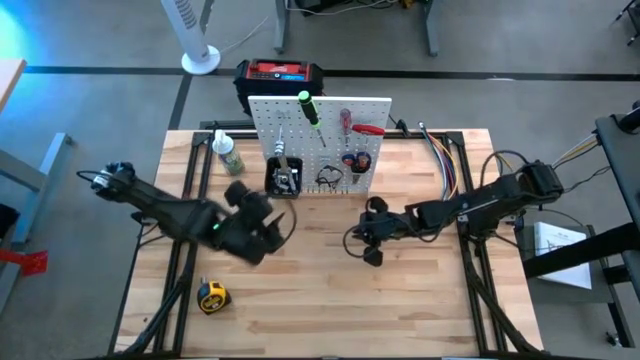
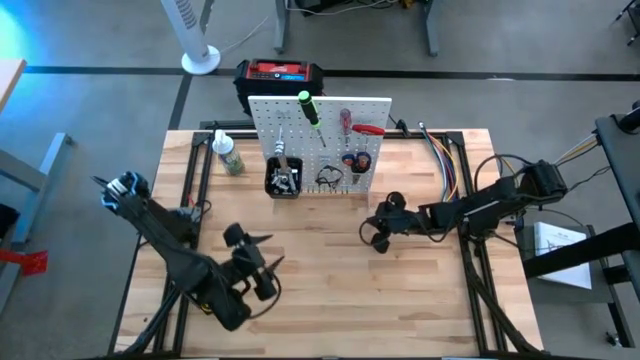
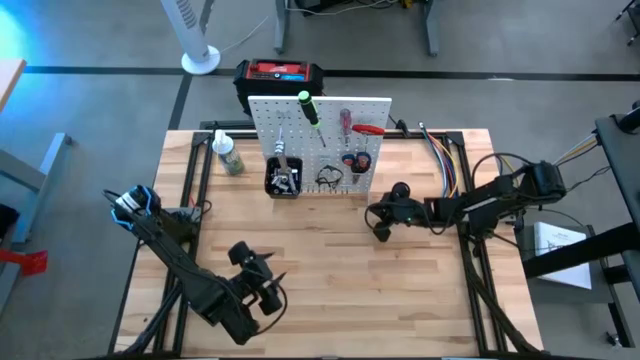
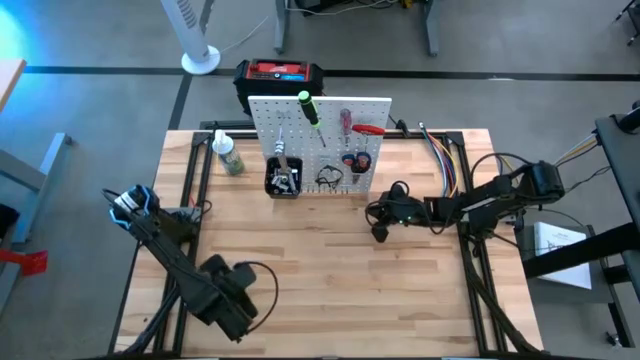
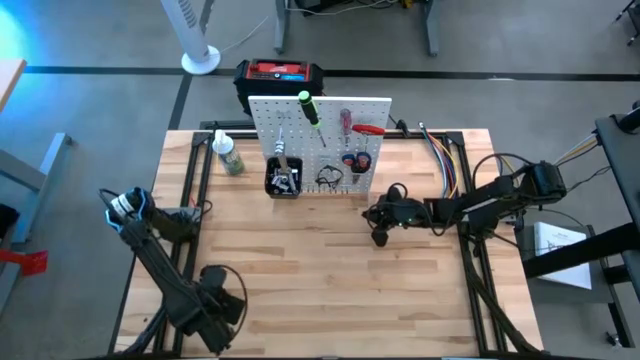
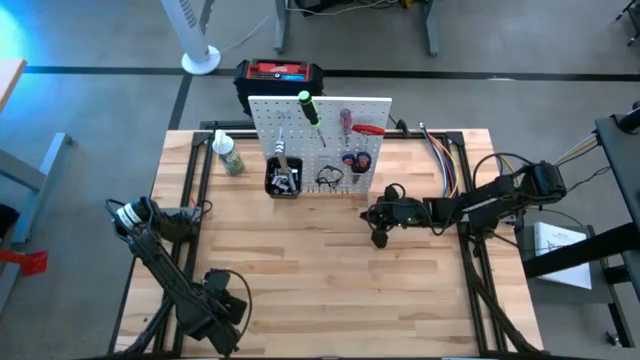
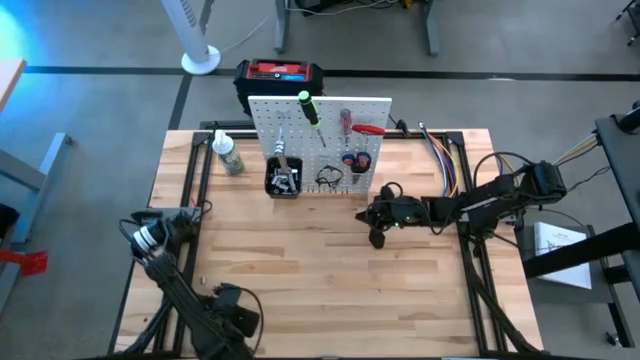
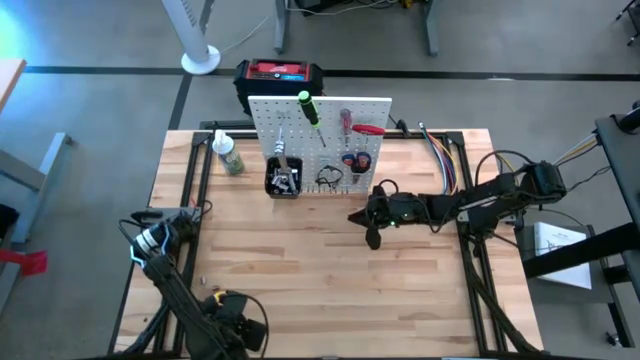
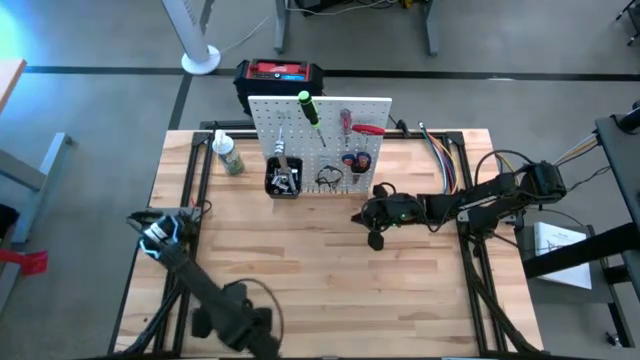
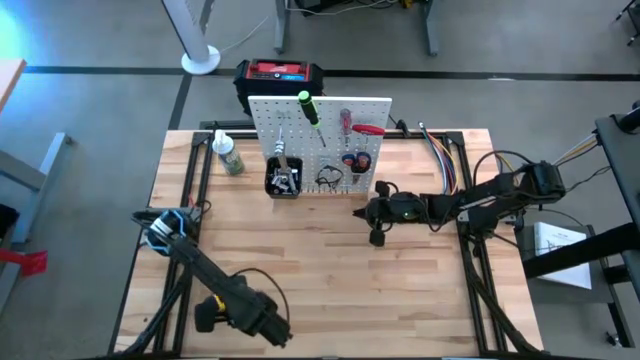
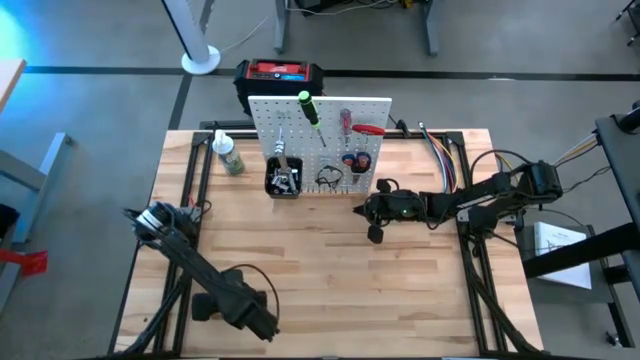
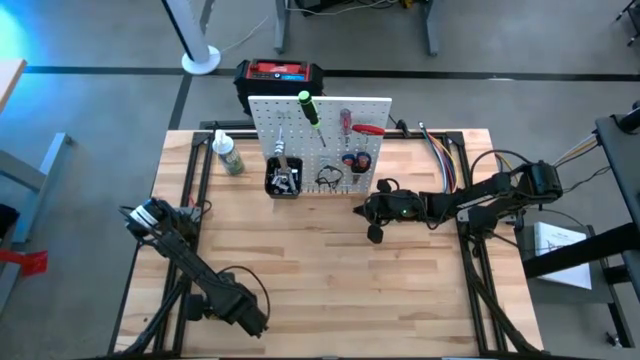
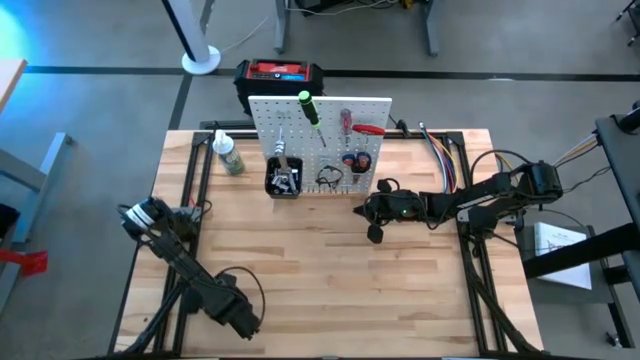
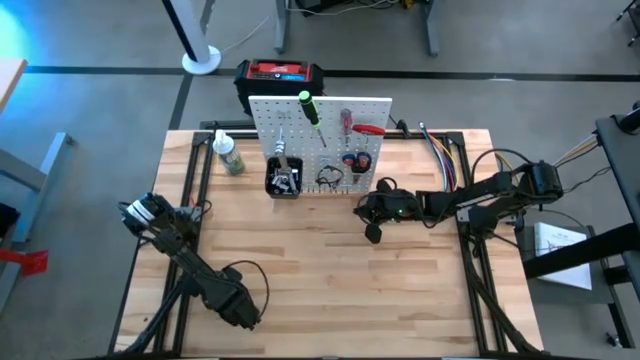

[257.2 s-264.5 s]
Task: Hang tools onto peg board
Hang the yellow measuring tape on the pegboard

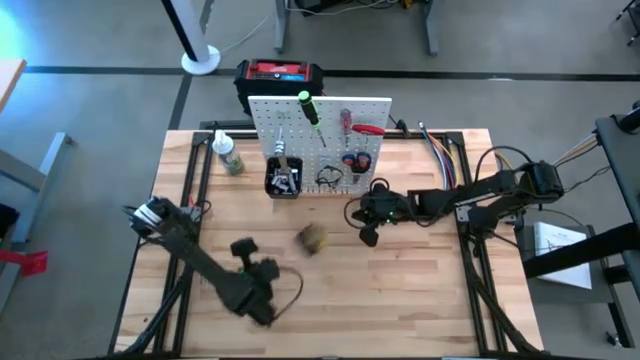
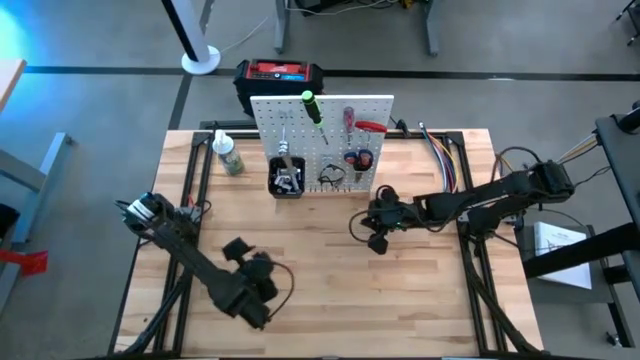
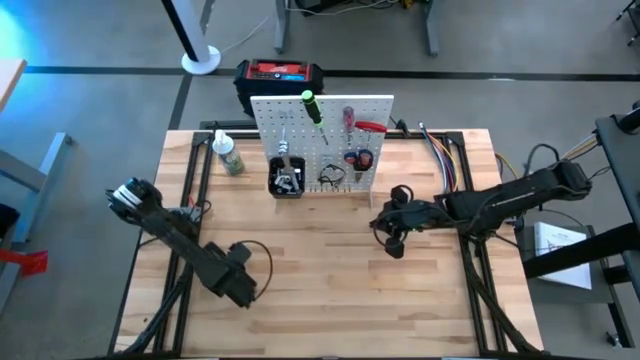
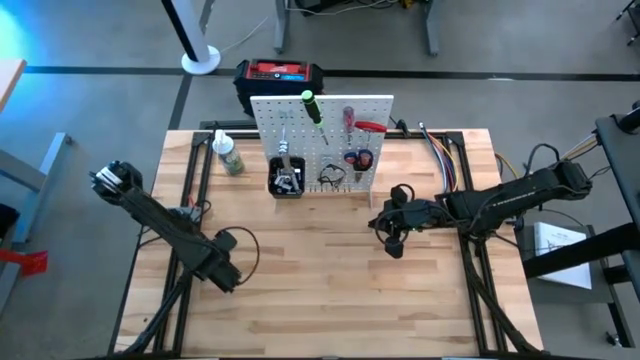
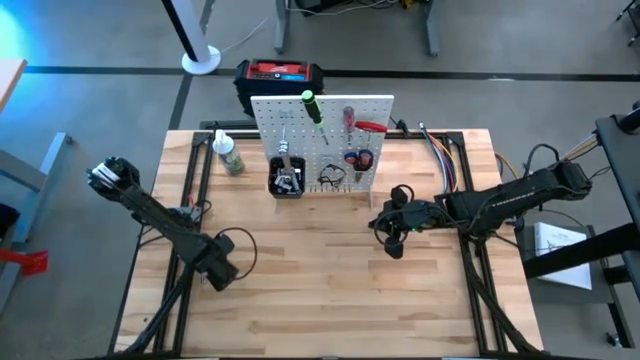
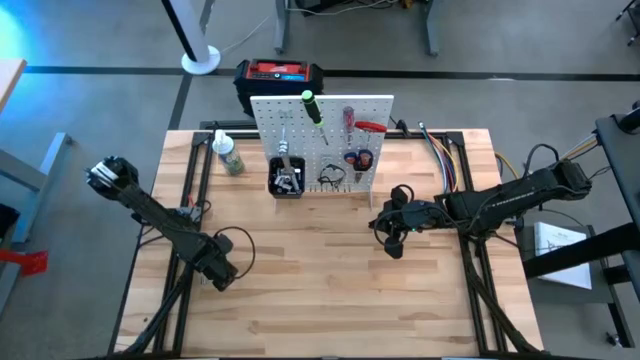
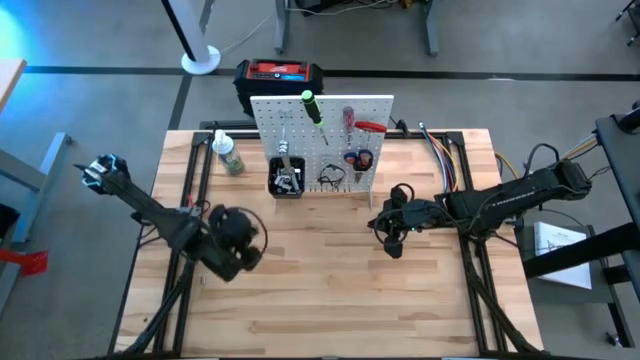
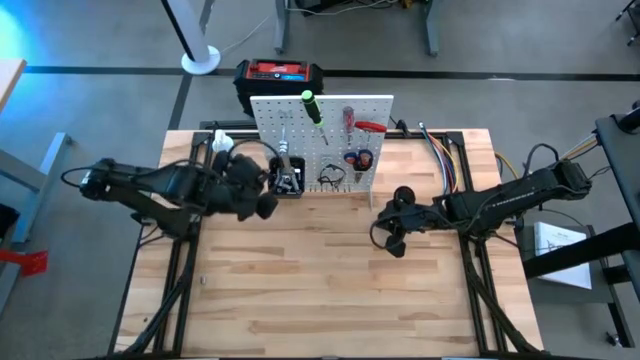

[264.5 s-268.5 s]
Put the silver socket into the black bin on the pegboard

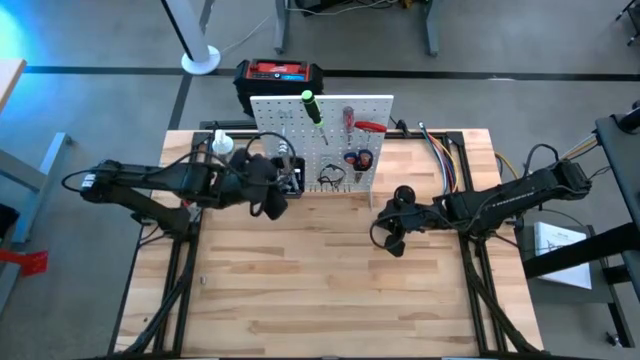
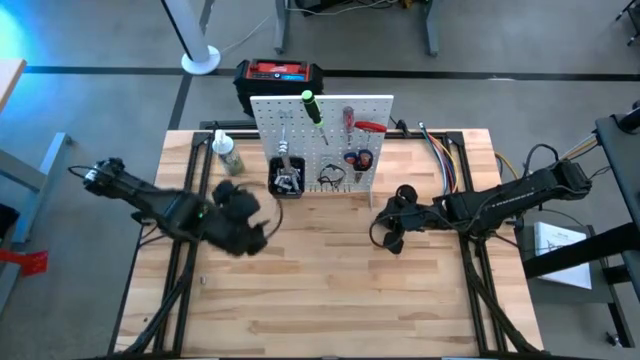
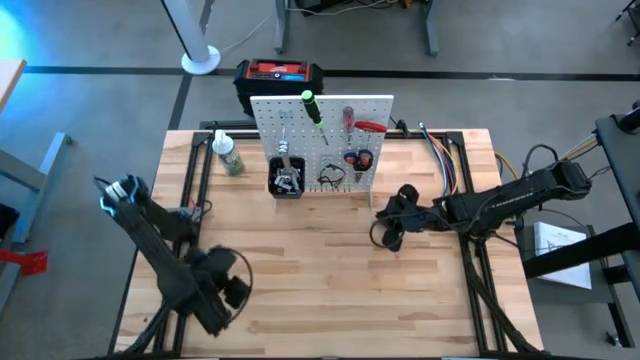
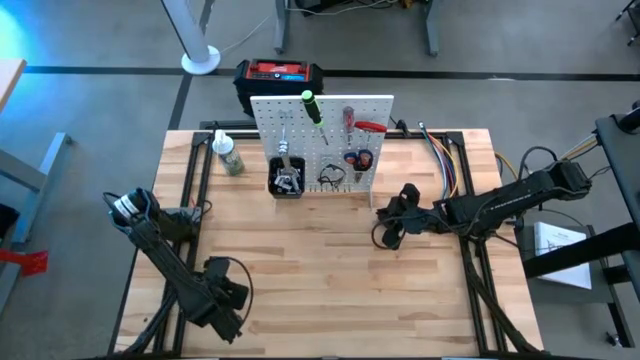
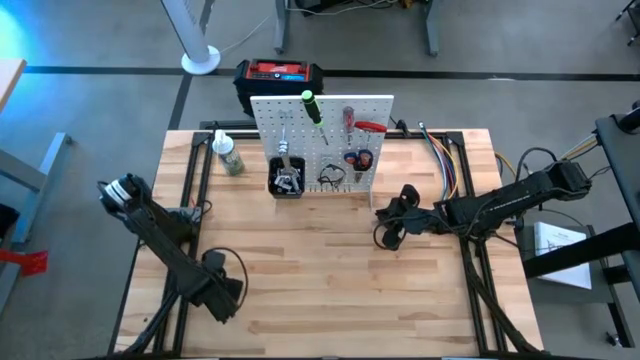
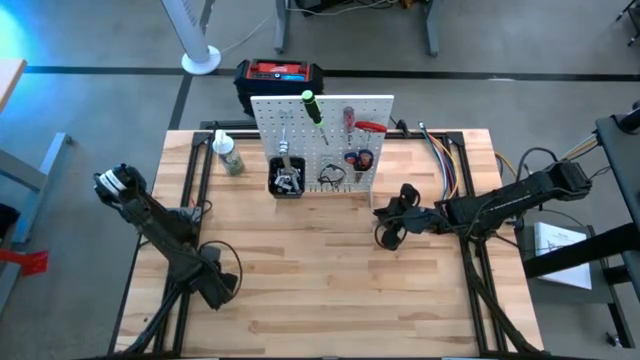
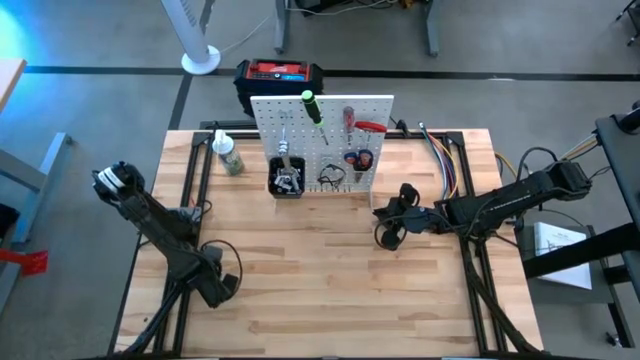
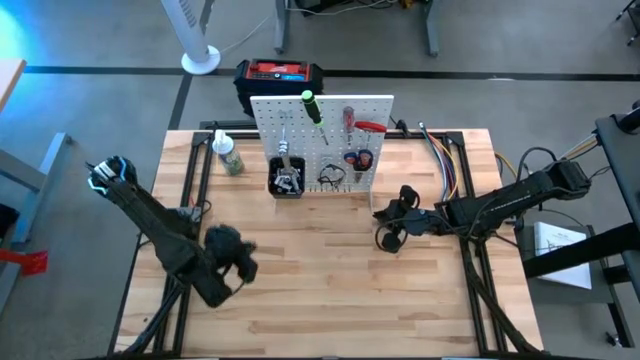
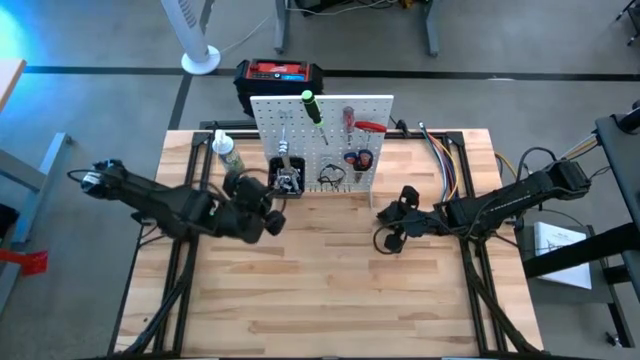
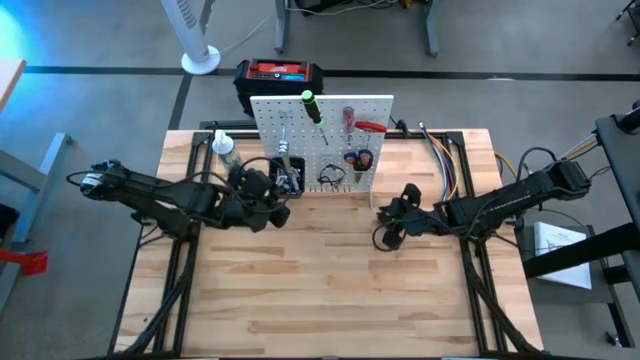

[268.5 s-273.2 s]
Put the silver socket into the black bin on the pegboard

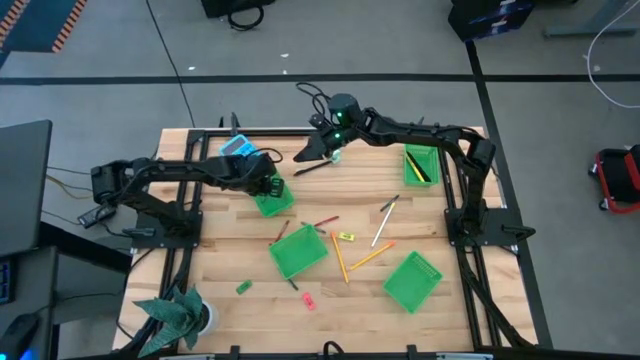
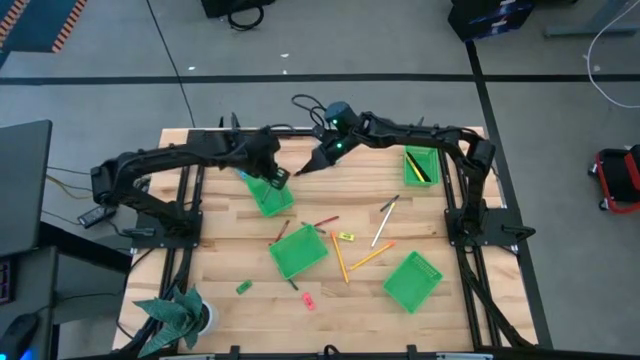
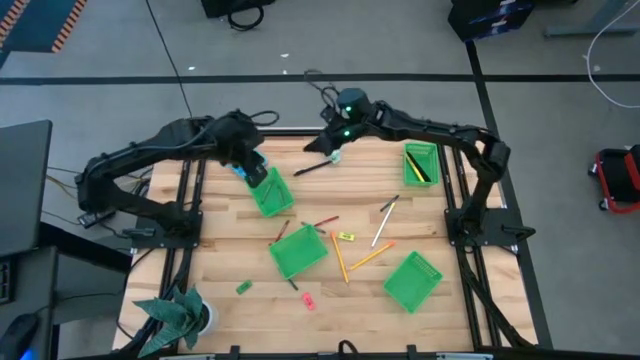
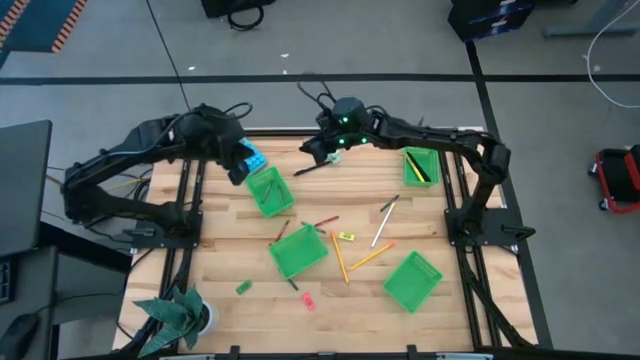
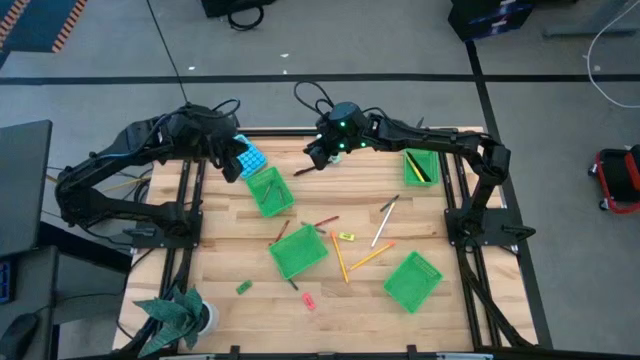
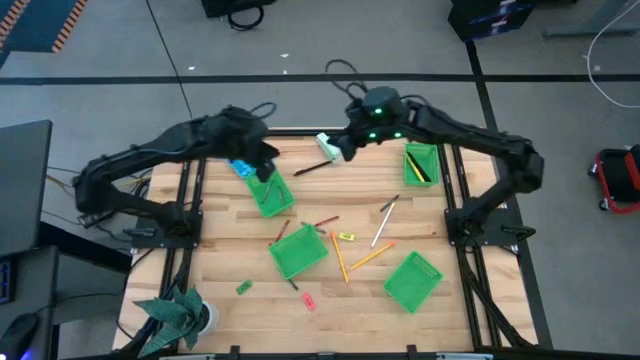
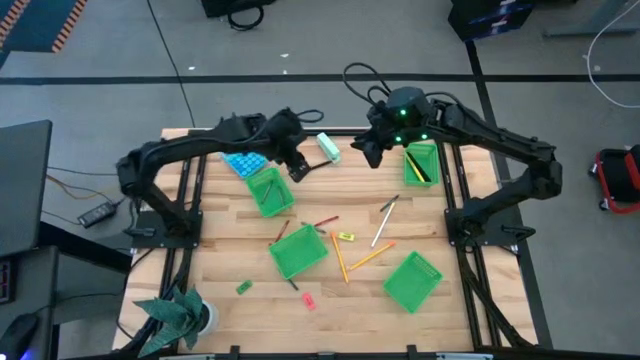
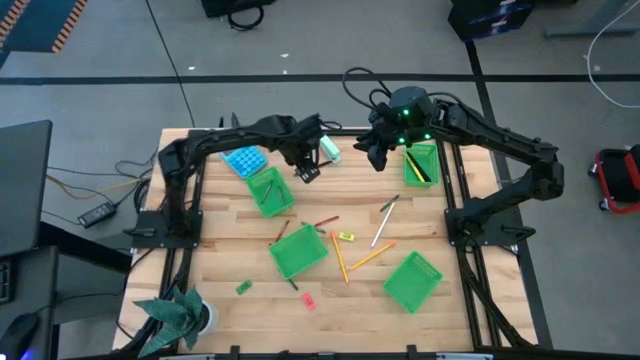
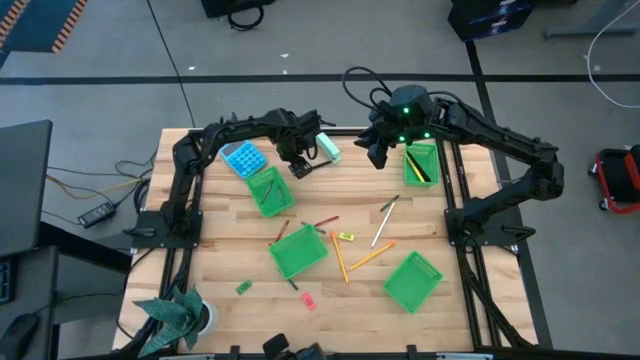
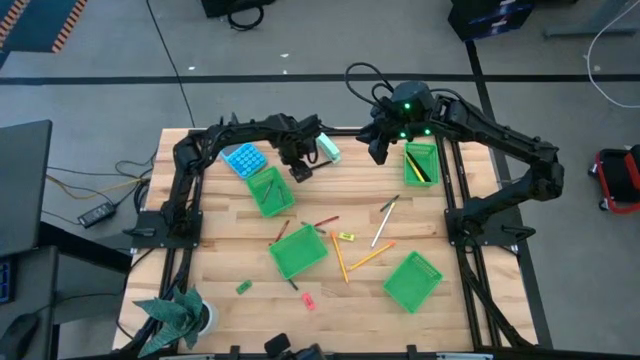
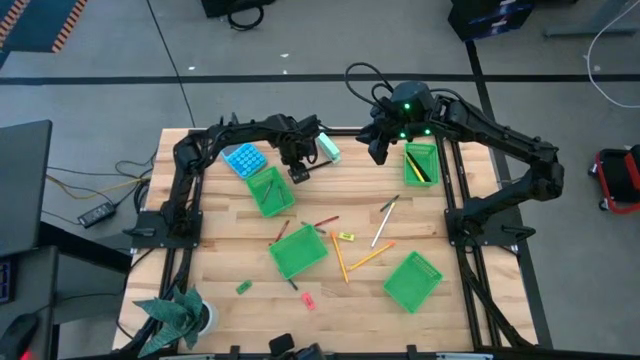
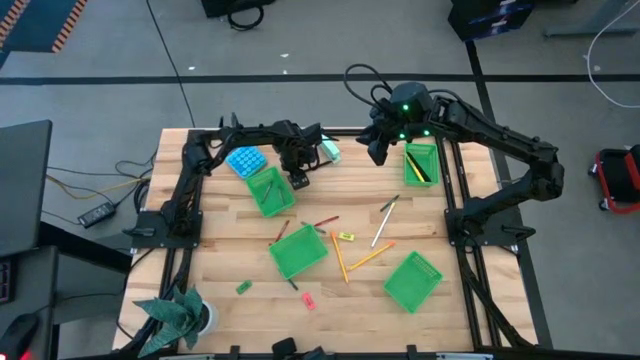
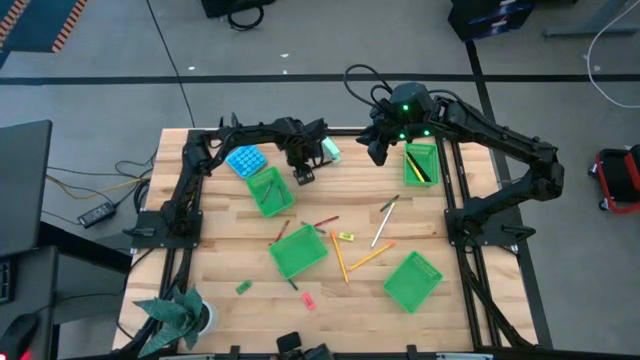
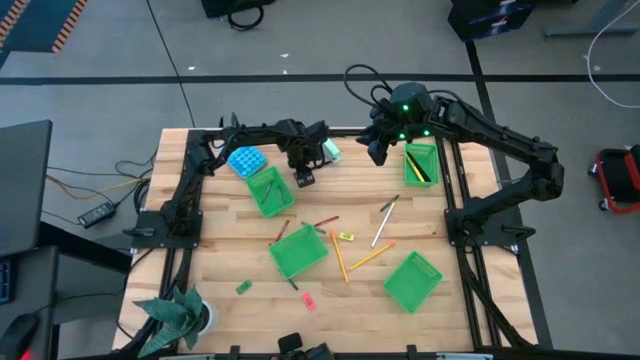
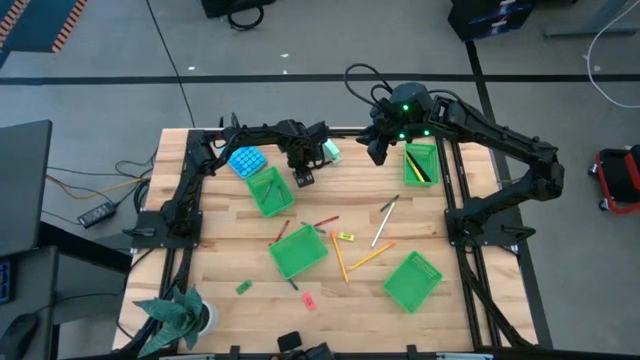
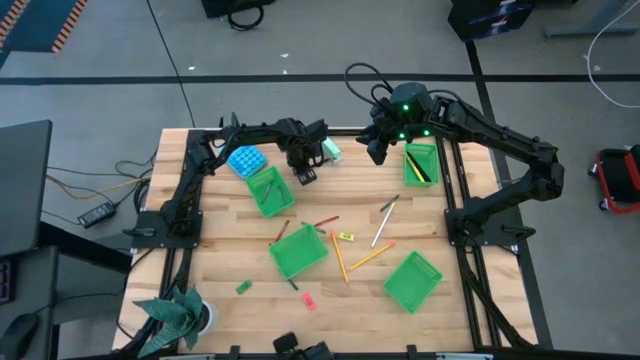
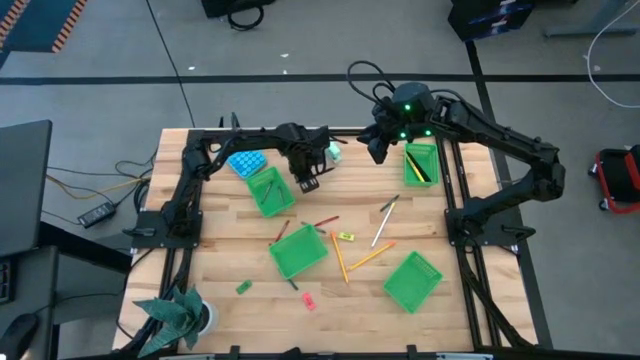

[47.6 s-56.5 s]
Task: Sort crayons/erasers/pens/pencils in bins
Put the black pen into the top right green bin
